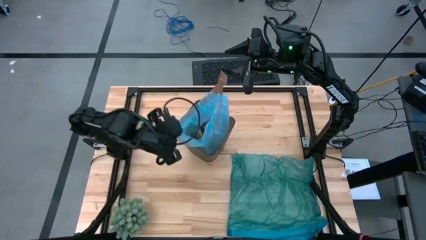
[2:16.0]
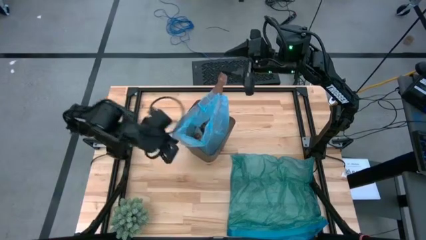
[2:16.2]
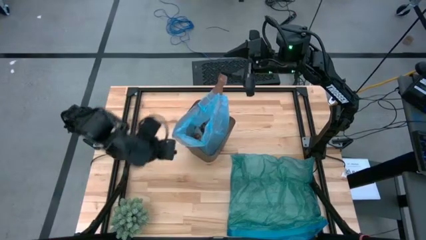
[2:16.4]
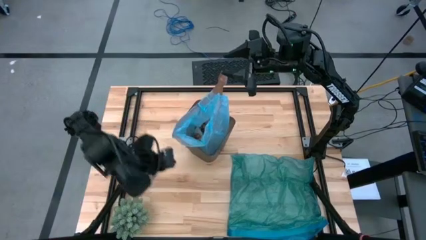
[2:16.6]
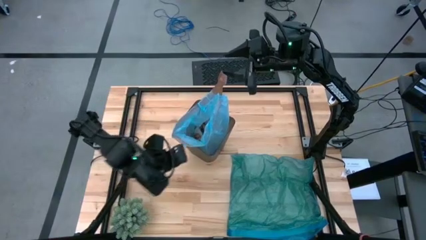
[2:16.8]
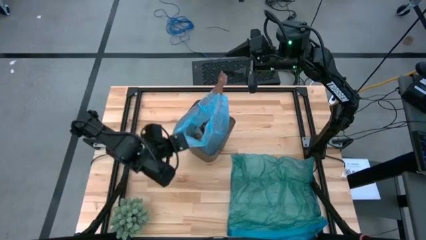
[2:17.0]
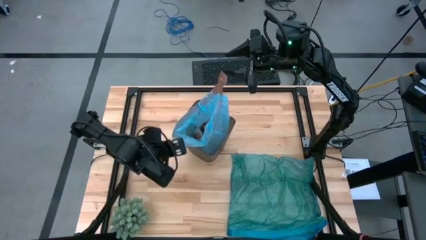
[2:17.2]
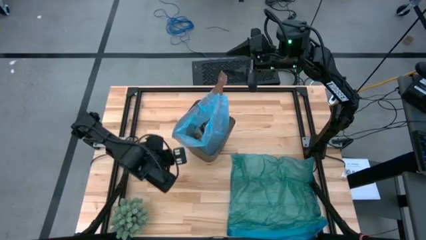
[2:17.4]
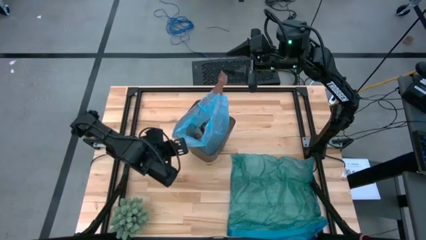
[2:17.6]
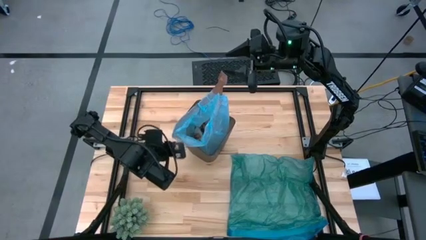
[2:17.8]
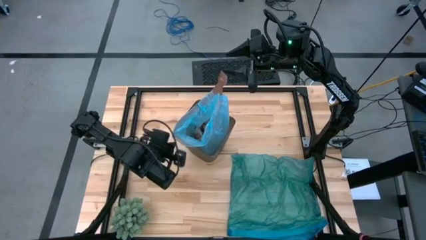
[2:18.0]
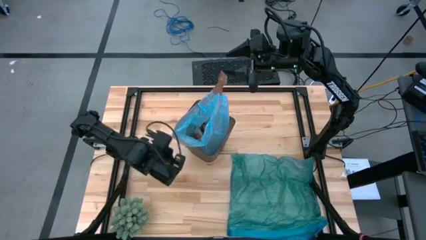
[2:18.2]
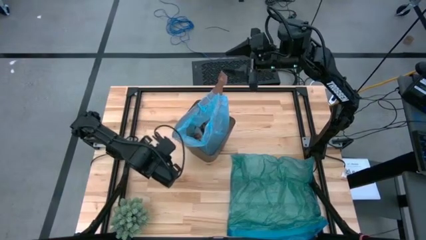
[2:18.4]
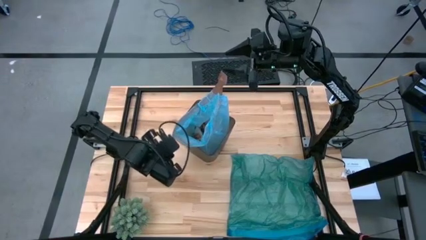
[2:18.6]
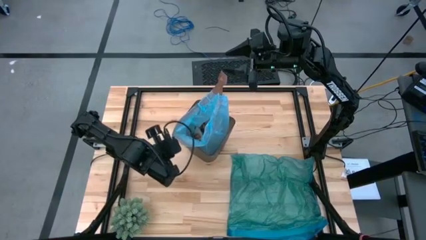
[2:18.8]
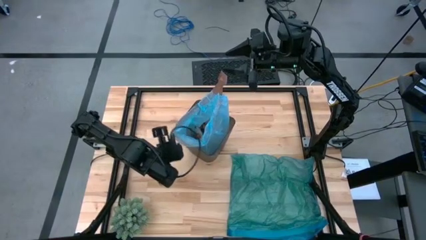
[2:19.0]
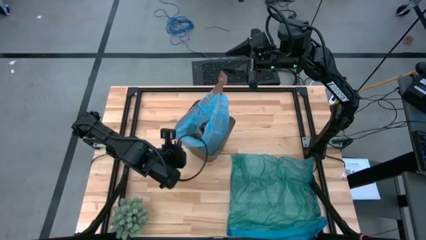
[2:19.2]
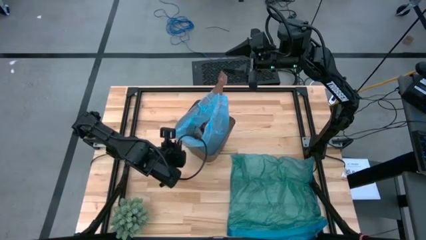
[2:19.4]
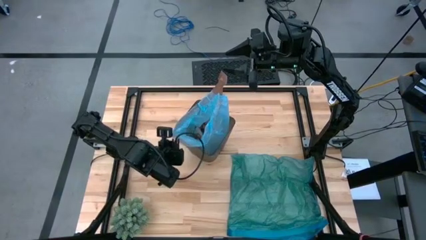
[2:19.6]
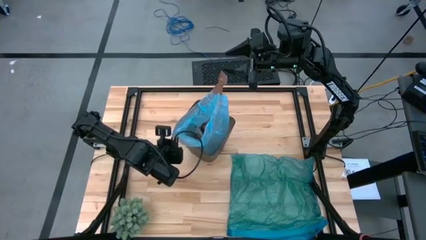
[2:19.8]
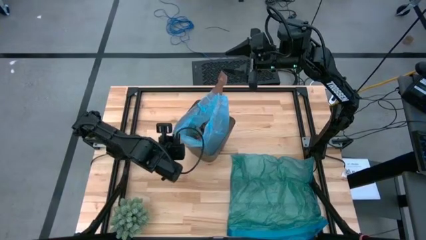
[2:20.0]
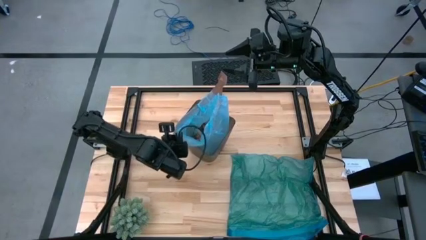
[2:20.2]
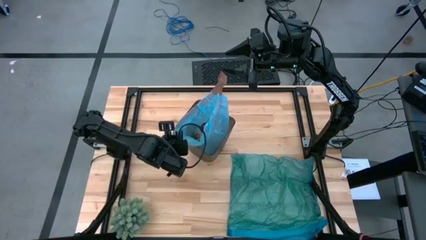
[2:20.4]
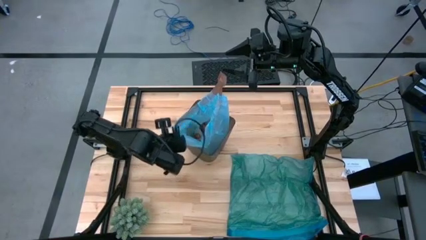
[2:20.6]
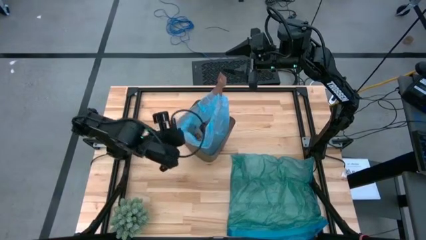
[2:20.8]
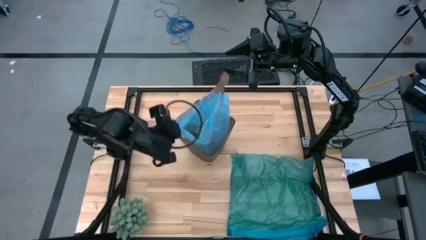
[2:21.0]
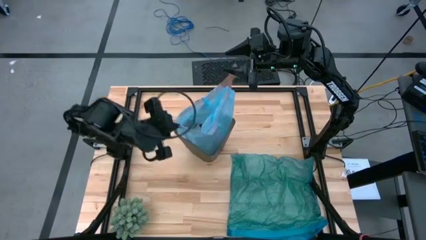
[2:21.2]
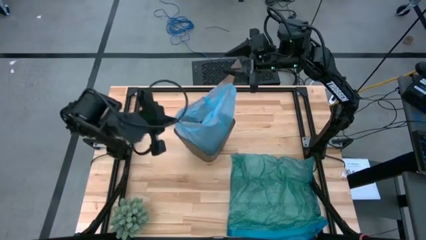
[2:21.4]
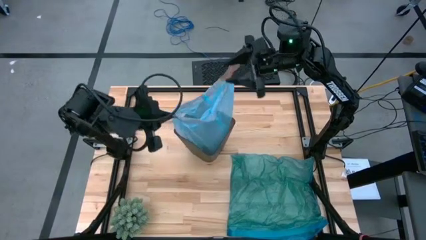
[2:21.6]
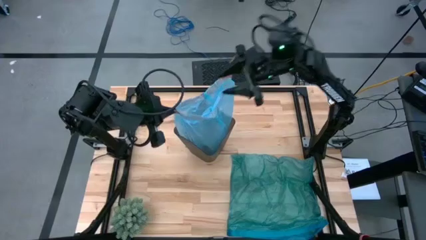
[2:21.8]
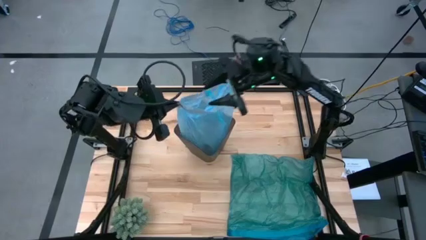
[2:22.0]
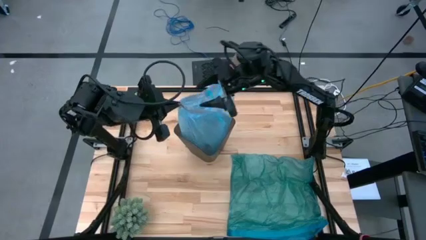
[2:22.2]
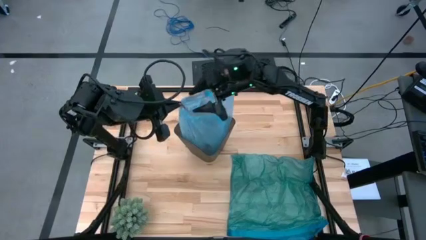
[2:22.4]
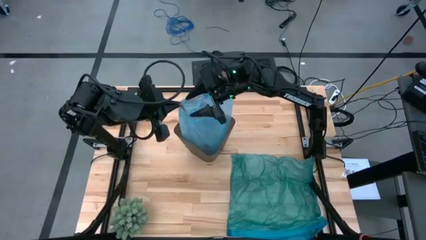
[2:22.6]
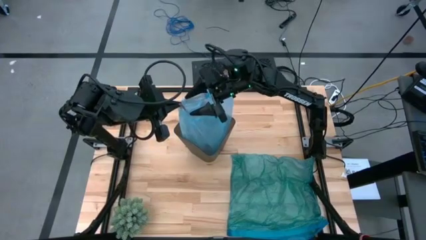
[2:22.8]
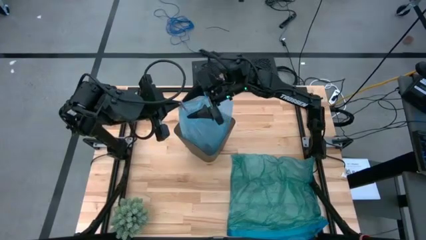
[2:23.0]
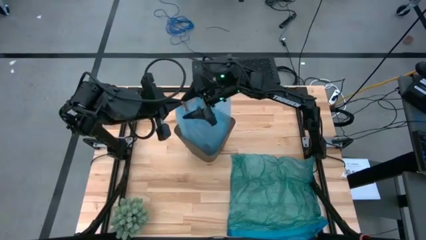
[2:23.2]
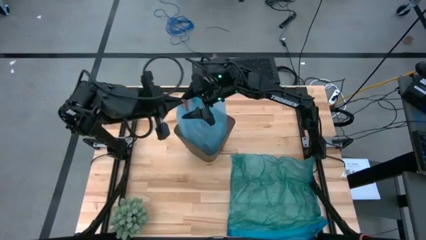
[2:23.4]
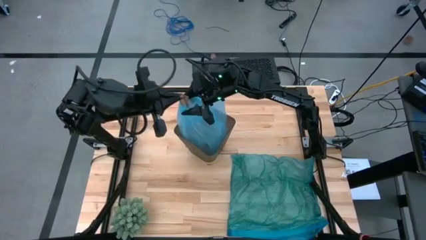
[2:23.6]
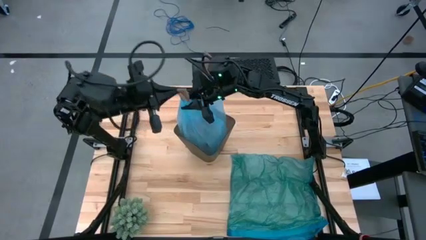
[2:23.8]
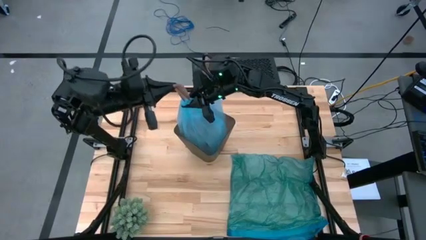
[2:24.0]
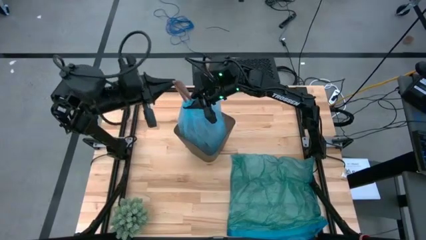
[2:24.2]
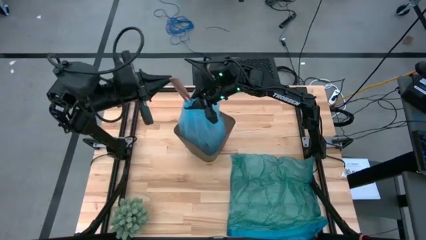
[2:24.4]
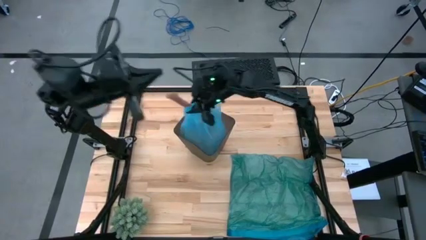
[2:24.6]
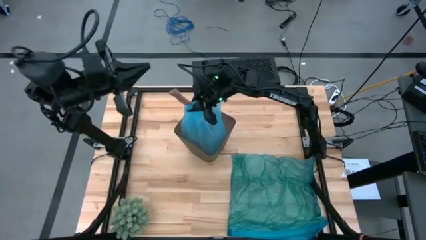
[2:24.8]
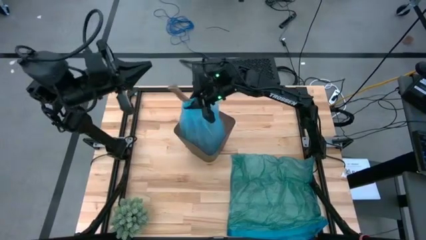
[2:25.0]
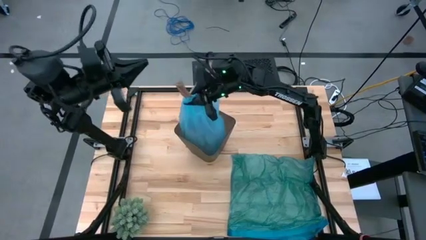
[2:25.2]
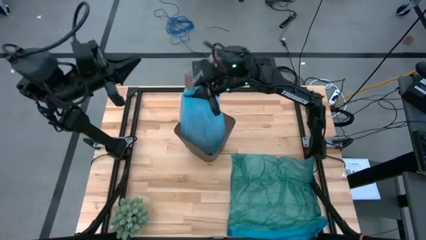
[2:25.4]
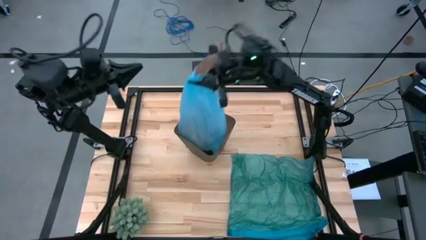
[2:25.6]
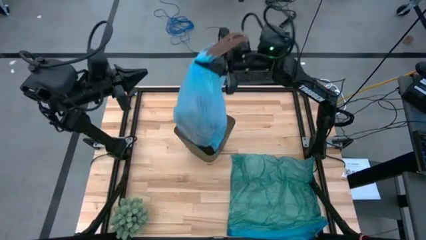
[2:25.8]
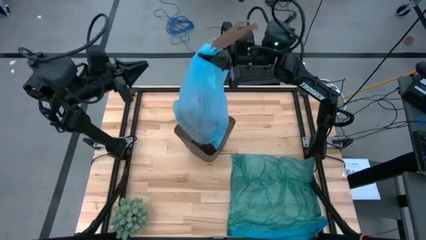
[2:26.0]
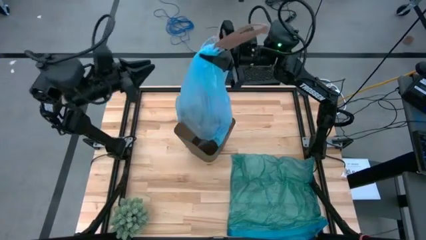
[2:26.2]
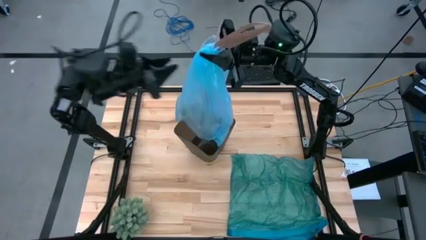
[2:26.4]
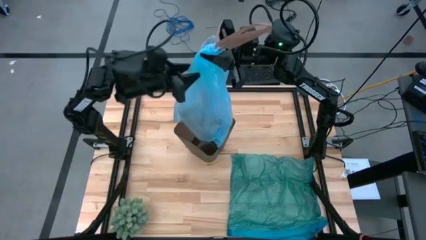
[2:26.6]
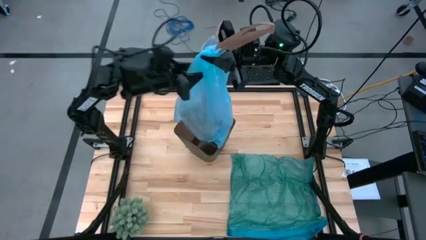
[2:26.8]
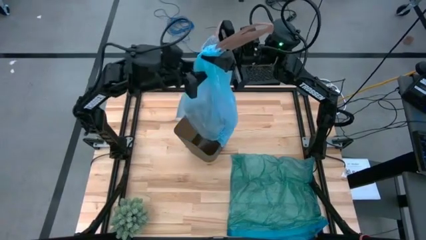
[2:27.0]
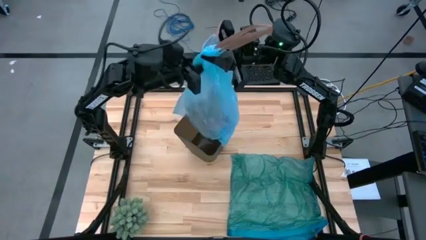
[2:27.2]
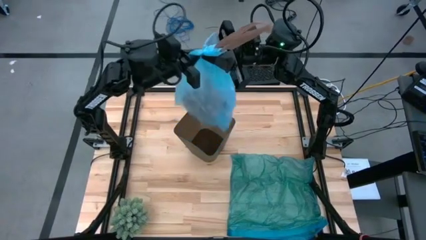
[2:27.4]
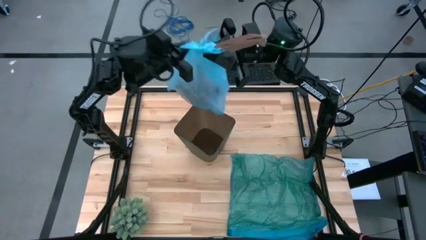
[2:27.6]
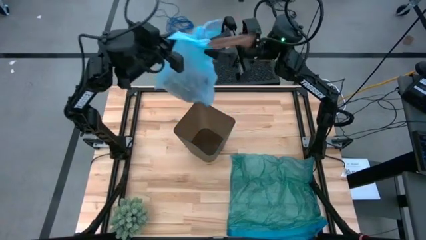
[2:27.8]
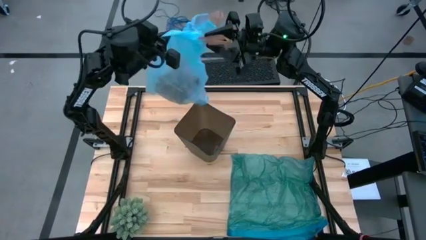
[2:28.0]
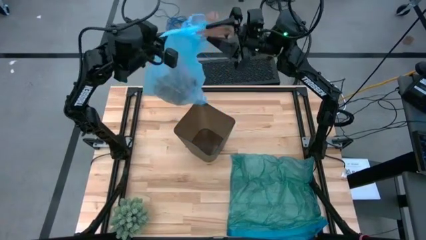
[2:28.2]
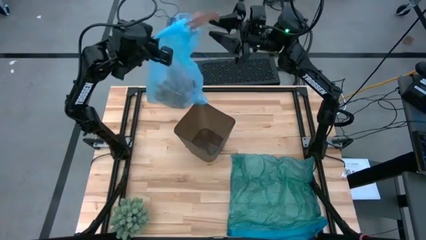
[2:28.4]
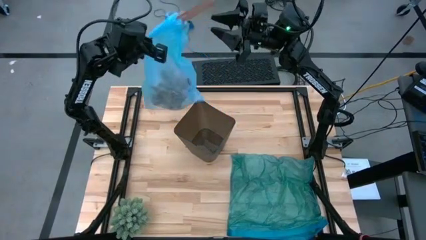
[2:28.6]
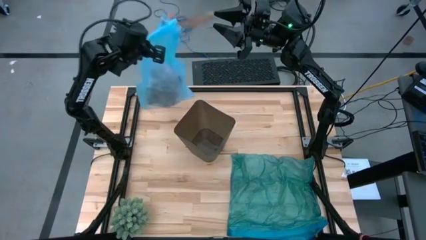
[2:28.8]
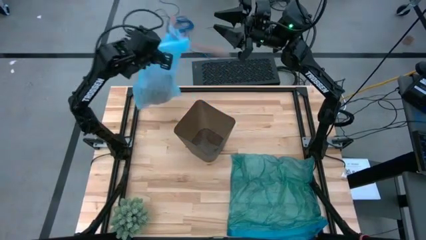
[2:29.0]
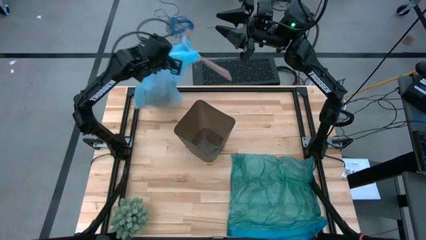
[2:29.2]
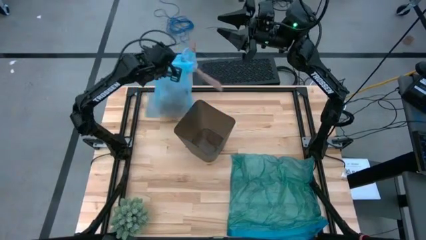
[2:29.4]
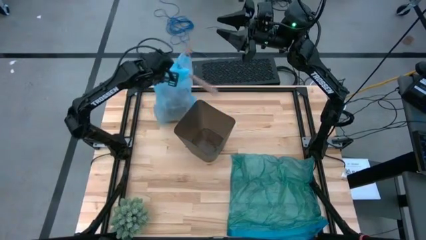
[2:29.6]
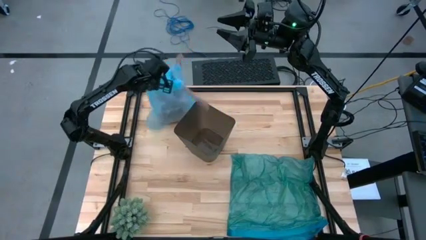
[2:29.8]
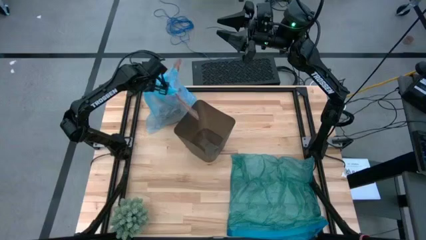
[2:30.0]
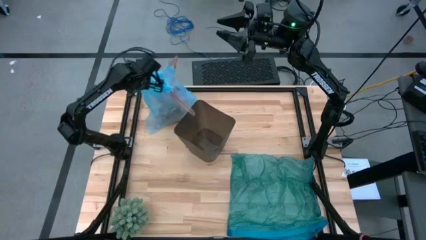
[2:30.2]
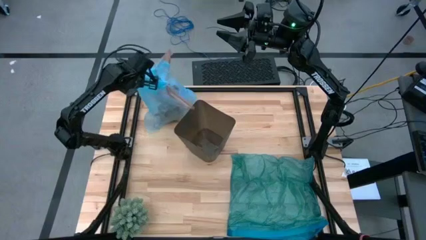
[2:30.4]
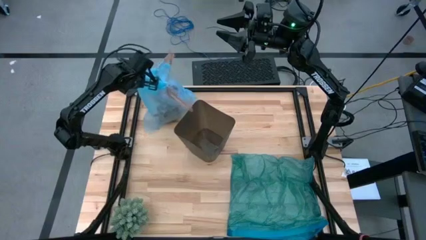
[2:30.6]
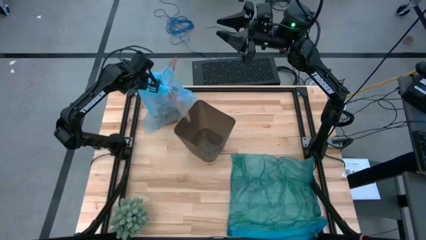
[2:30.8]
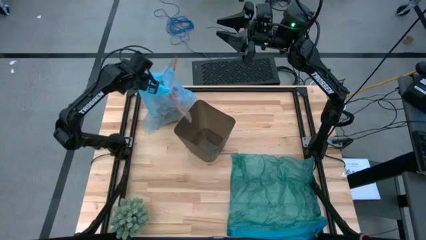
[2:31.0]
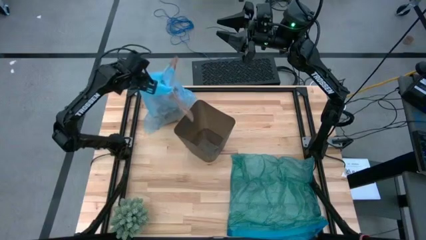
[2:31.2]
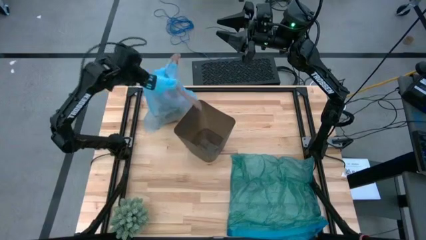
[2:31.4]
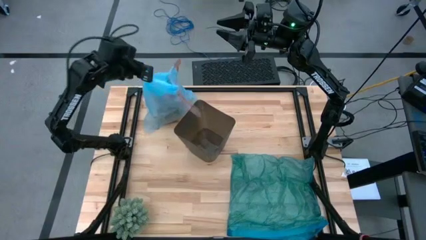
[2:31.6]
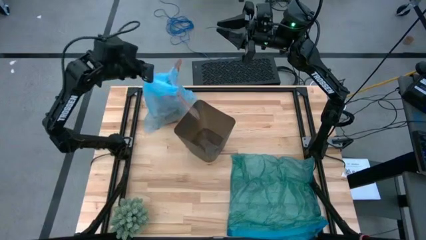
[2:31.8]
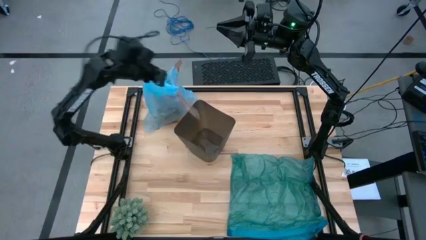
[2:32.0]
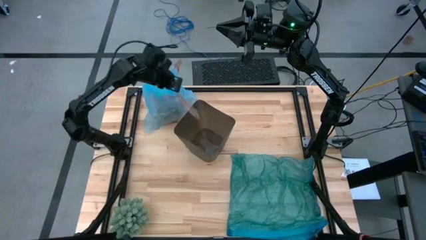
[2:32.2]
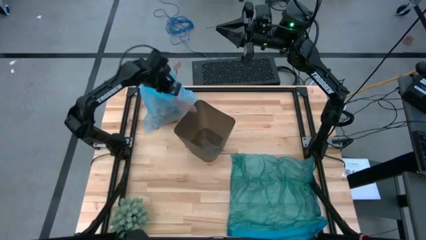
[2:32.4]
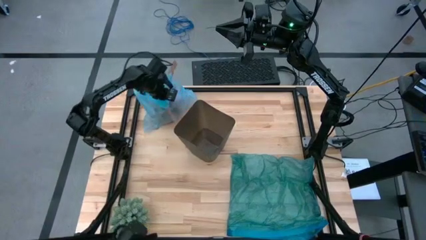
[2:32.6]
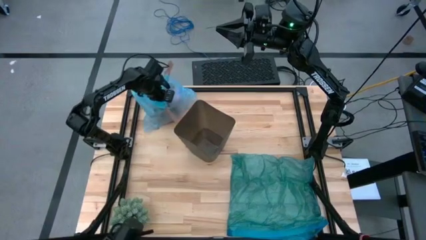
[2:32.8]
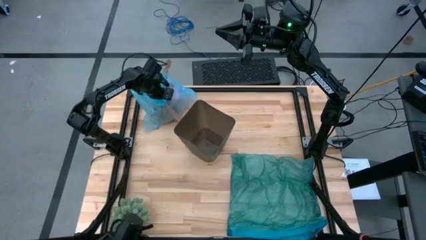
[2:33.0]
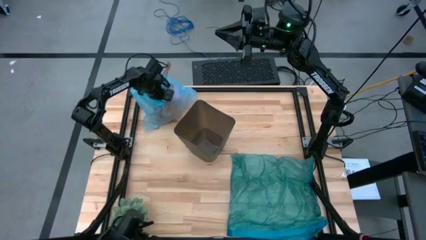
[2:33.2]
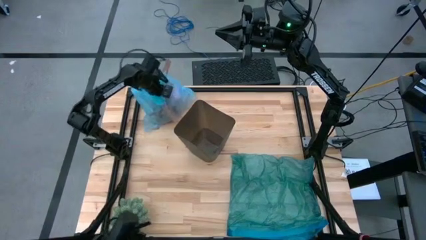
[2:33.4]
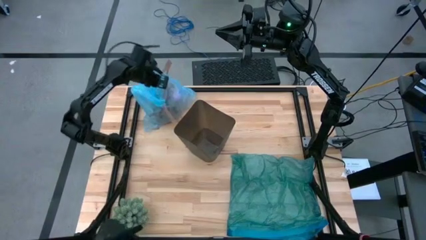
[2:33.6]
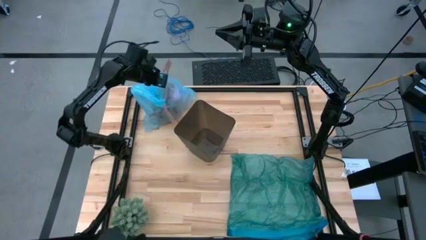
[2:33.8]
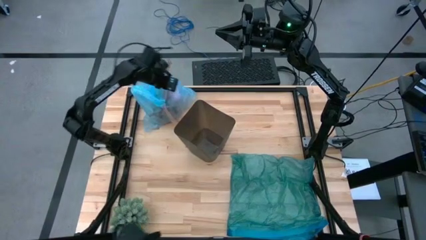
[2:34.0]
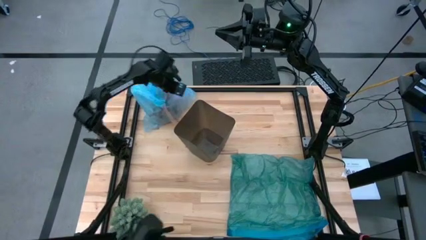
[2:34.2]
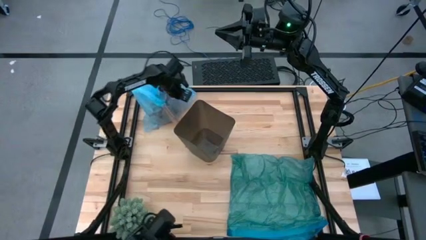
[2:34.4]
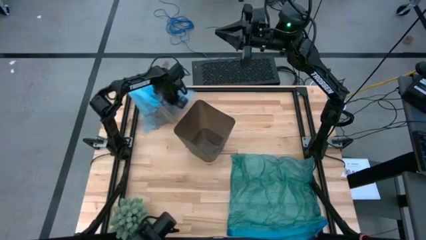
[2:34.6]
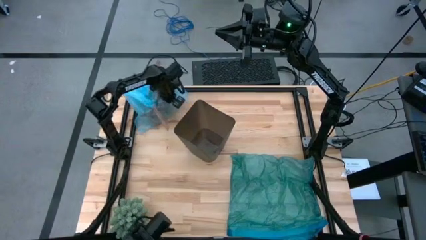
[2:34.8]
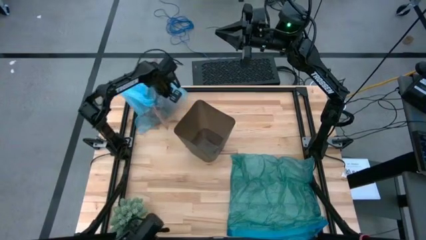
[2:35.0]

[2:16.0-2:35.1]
Task: place trash/remove bag and relplace
Remove the light blue trash bag from the black trash bin
